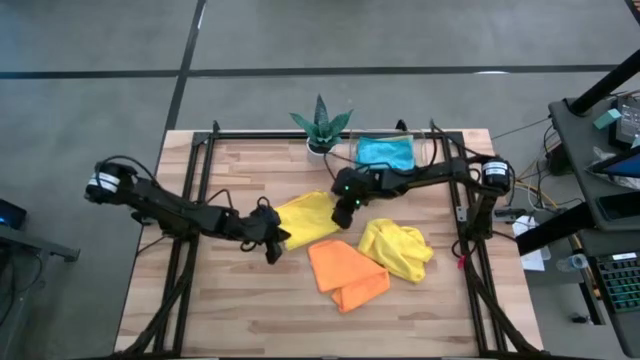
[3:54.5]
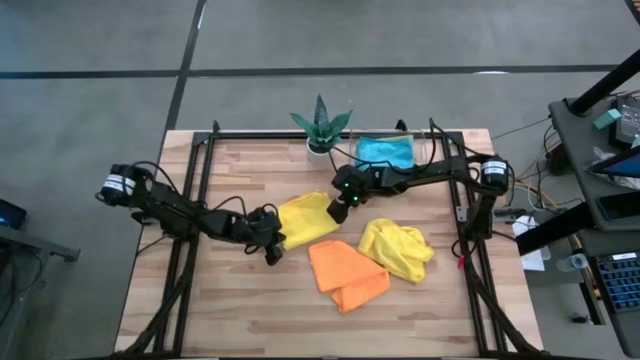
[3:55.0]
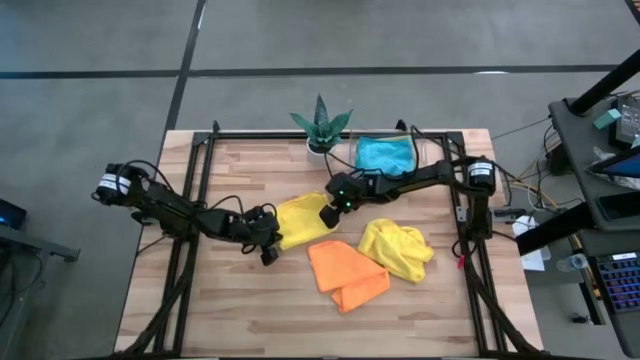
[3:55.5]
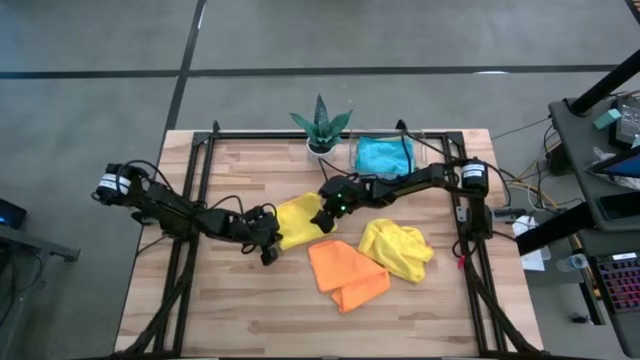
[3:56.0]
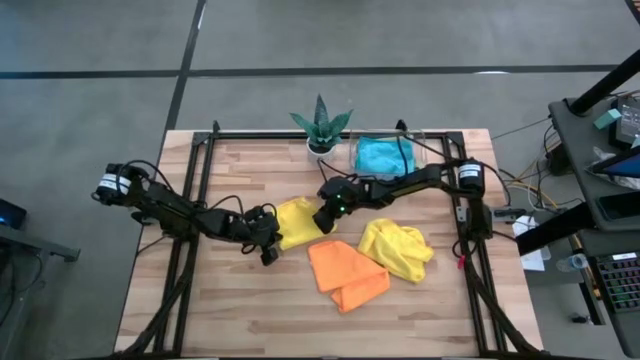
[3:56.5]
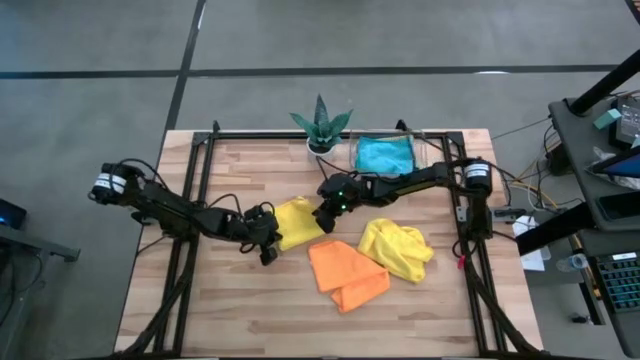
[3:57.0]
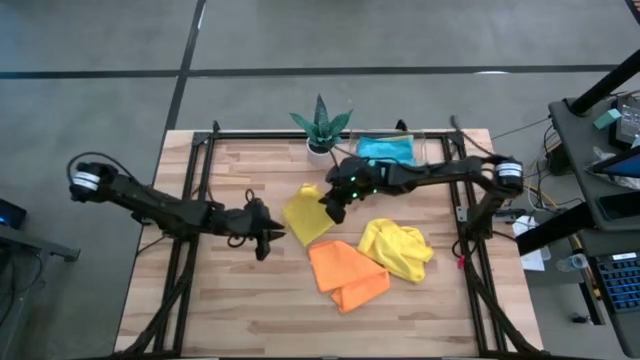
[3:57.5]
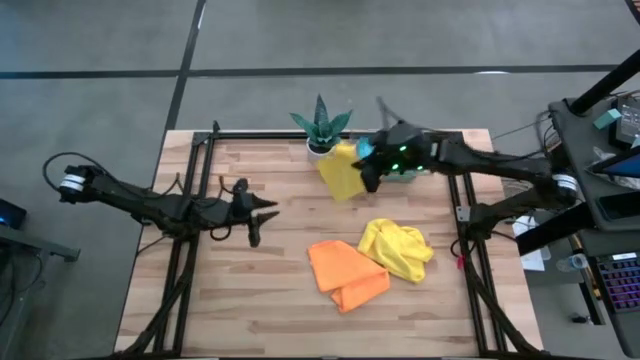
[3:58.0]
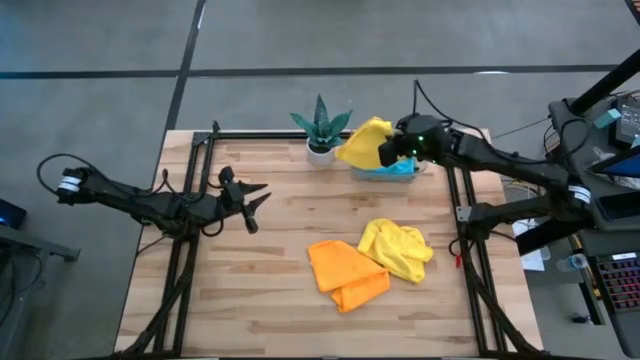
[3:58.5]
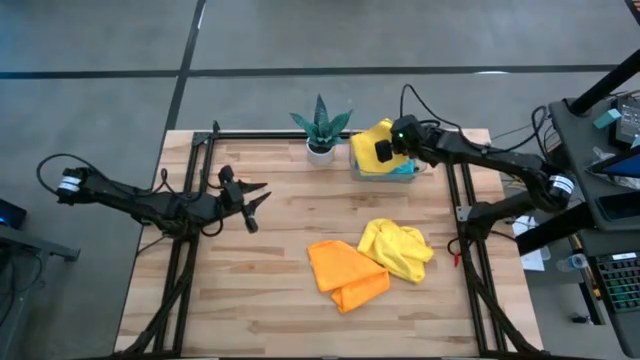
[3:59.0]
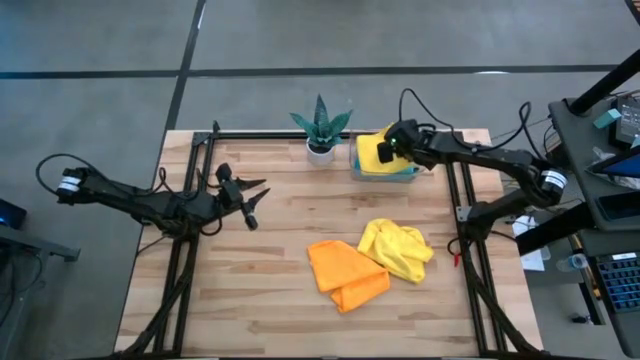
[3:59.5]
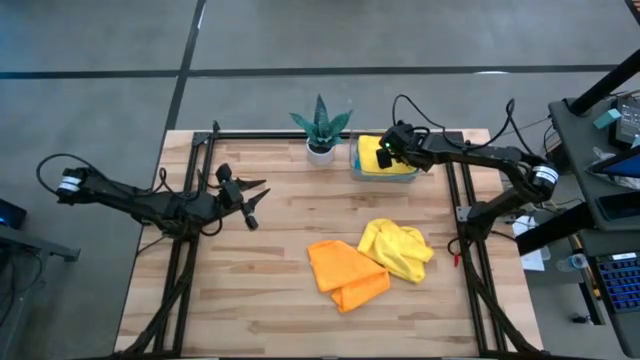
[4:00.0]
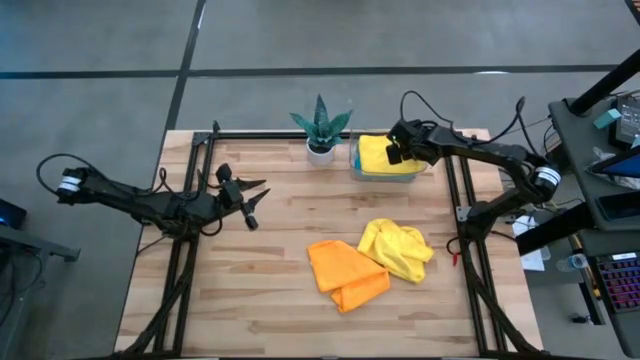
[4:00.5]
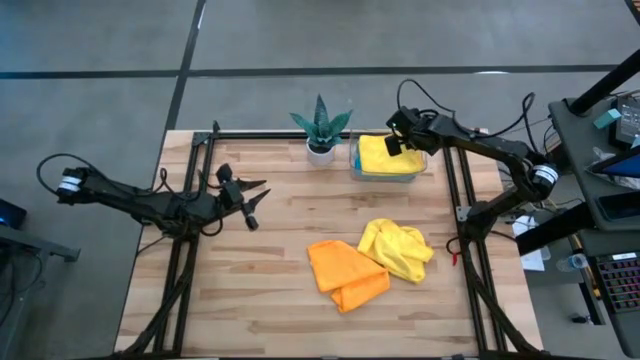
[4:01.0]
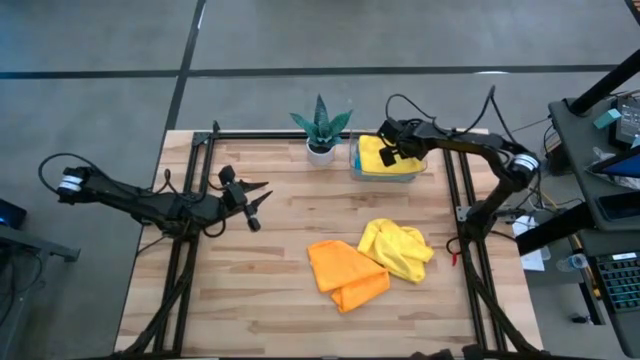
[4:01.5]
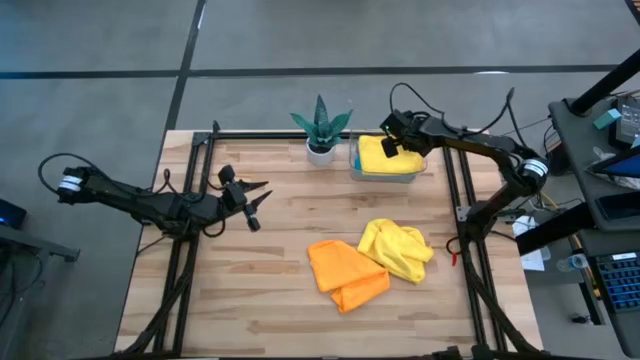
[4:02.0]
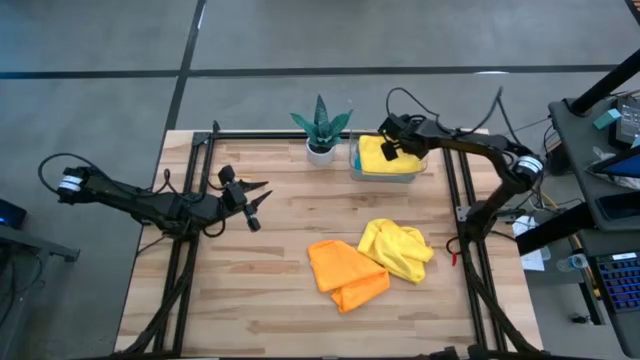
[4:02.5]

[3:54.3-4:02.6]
Task: Fold microfiber towels
Put the left yellow microfiber towel into the transparent bin

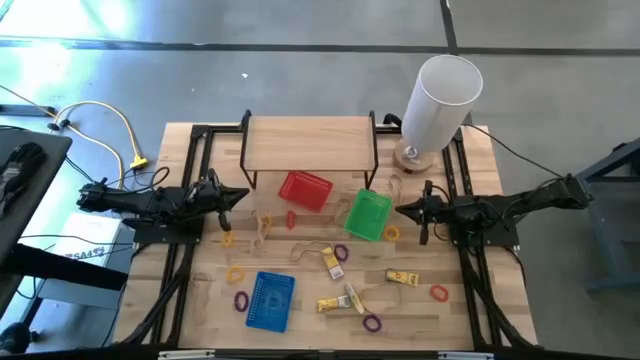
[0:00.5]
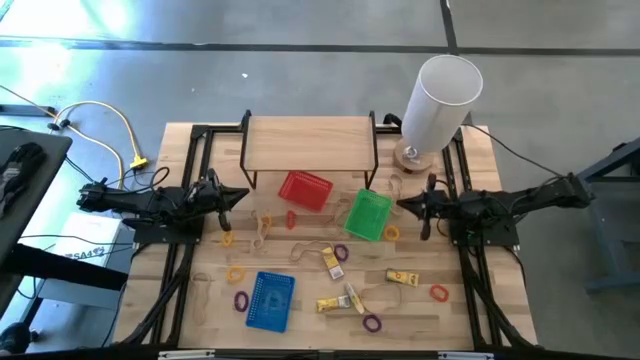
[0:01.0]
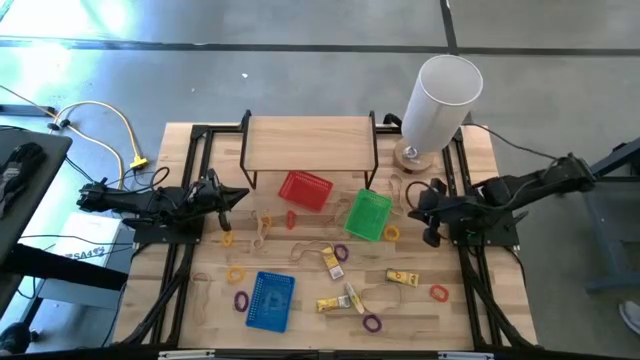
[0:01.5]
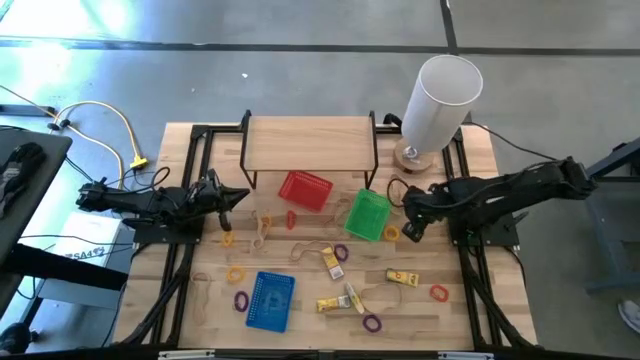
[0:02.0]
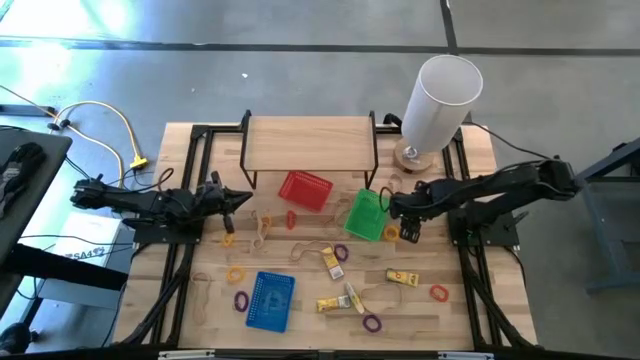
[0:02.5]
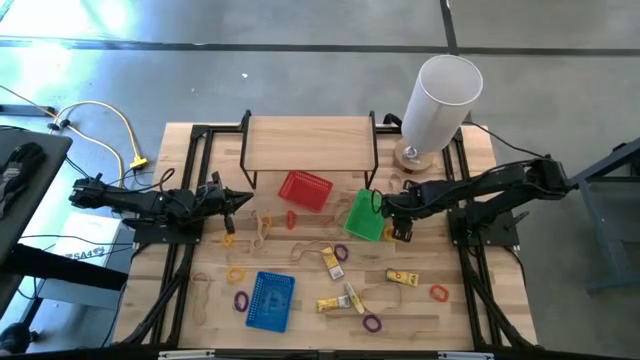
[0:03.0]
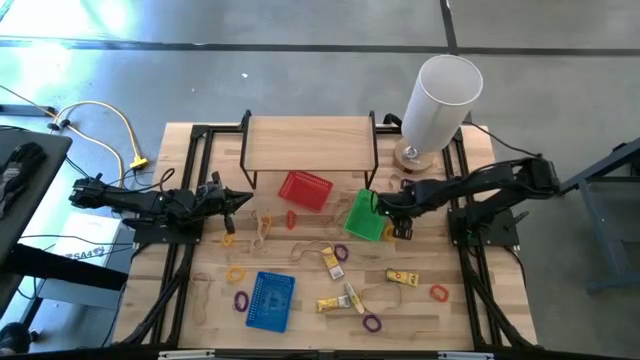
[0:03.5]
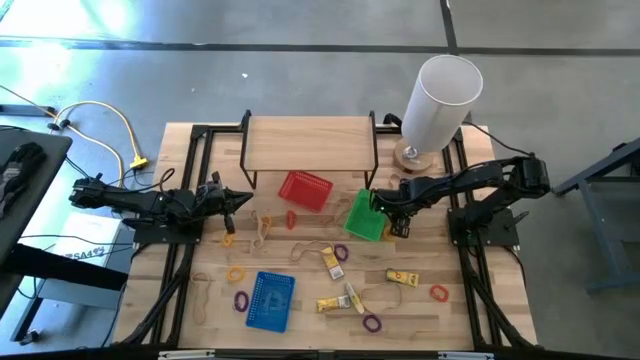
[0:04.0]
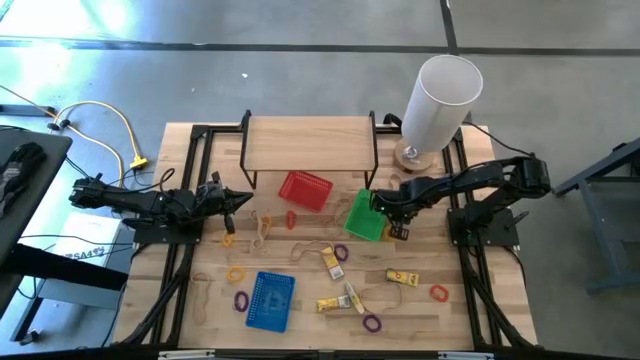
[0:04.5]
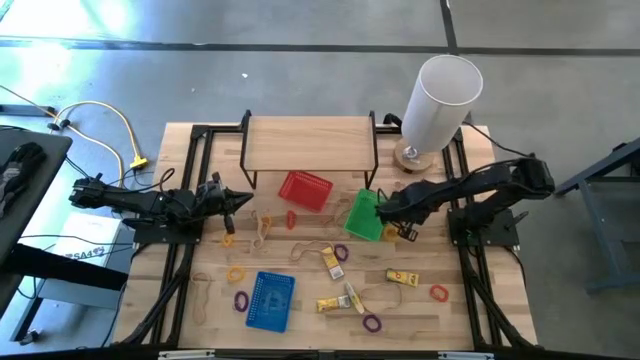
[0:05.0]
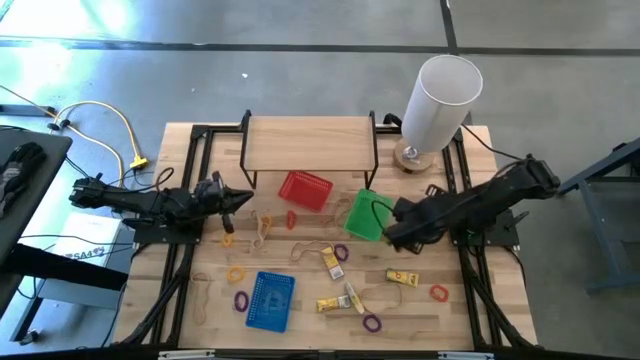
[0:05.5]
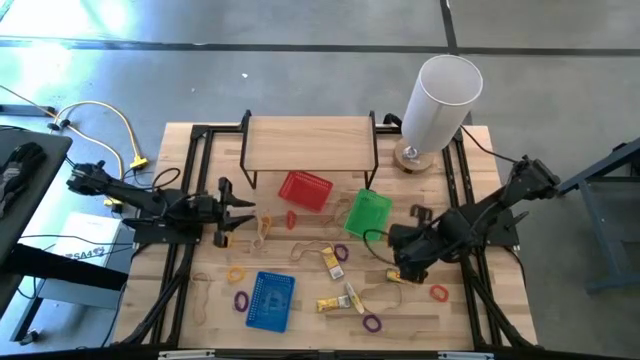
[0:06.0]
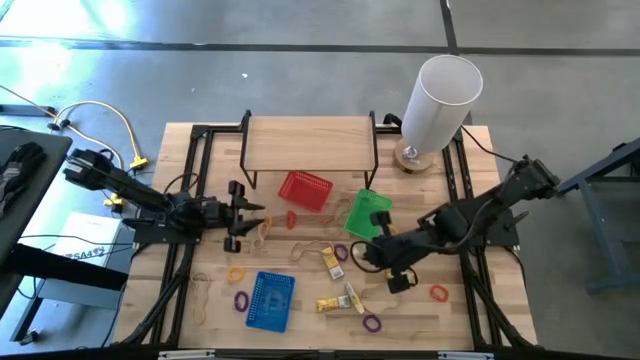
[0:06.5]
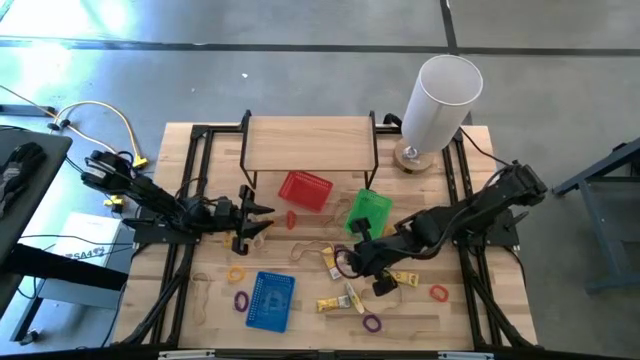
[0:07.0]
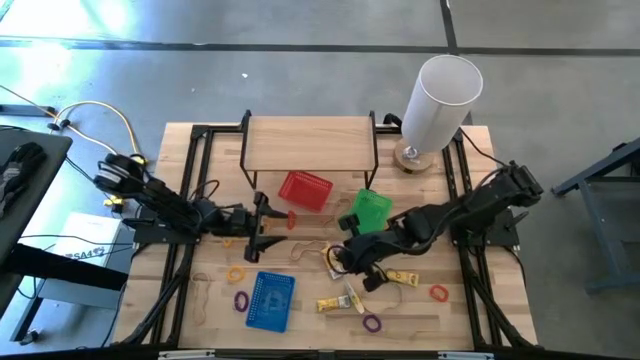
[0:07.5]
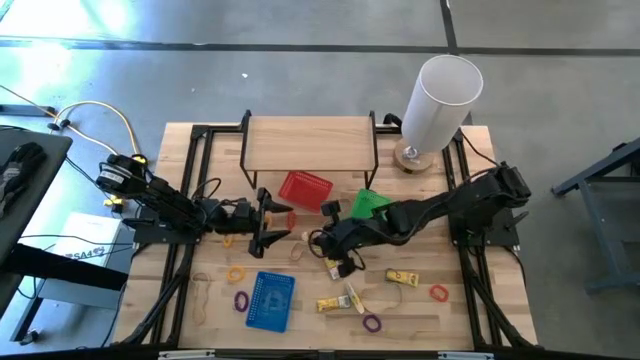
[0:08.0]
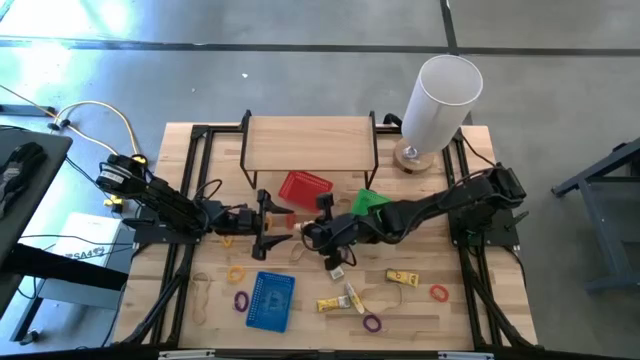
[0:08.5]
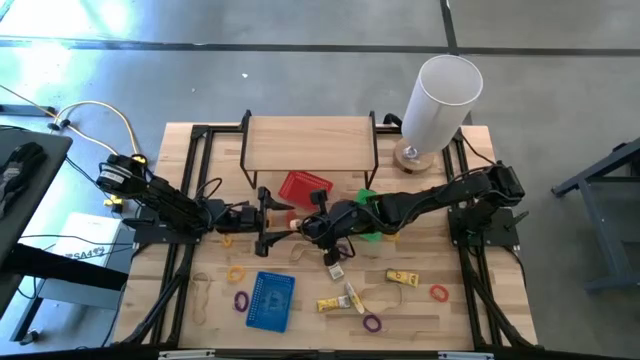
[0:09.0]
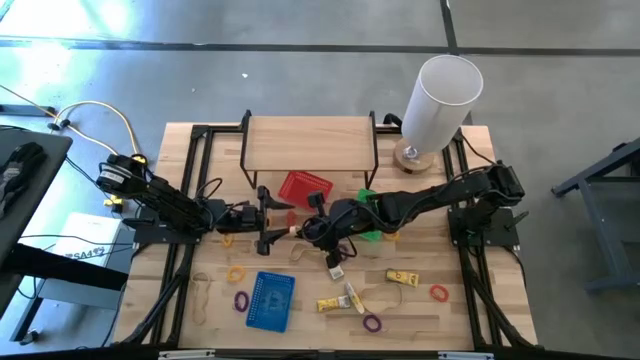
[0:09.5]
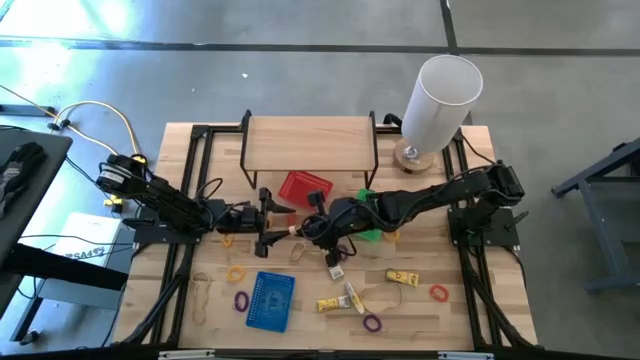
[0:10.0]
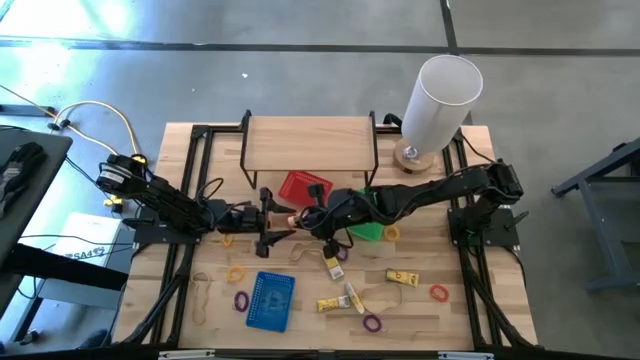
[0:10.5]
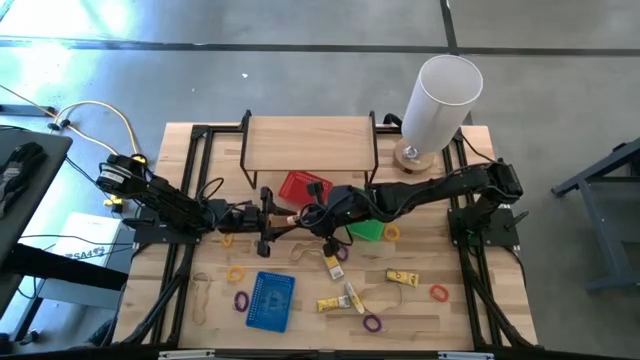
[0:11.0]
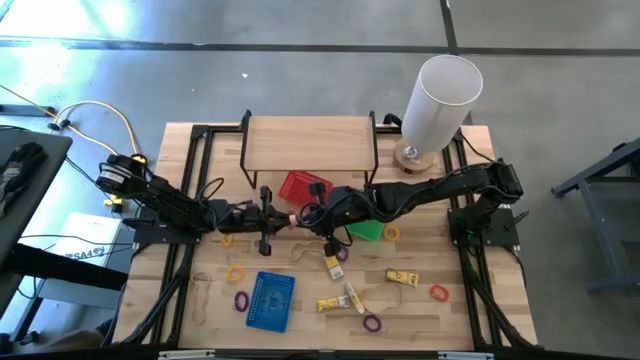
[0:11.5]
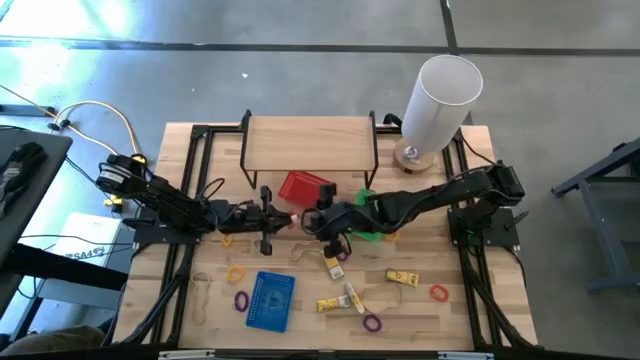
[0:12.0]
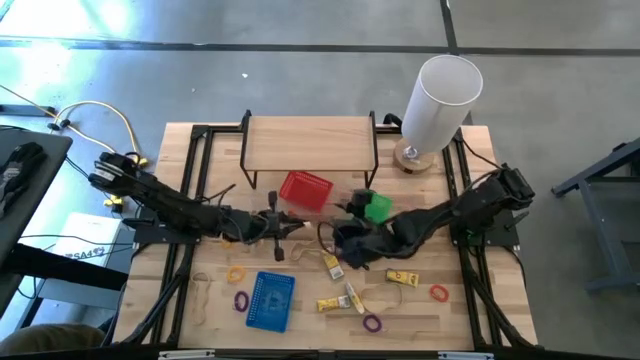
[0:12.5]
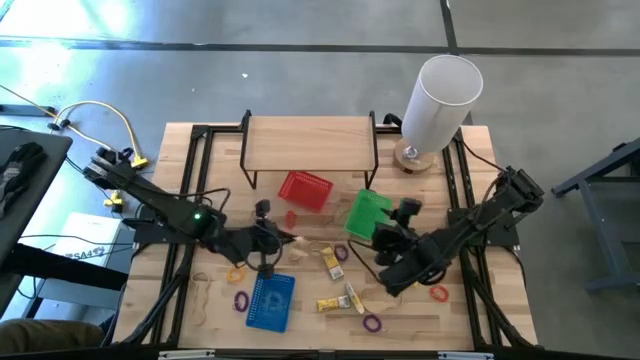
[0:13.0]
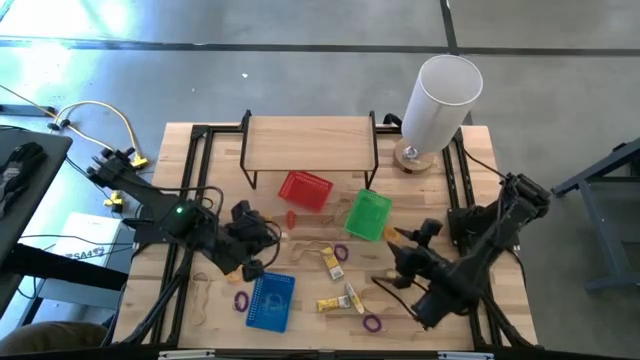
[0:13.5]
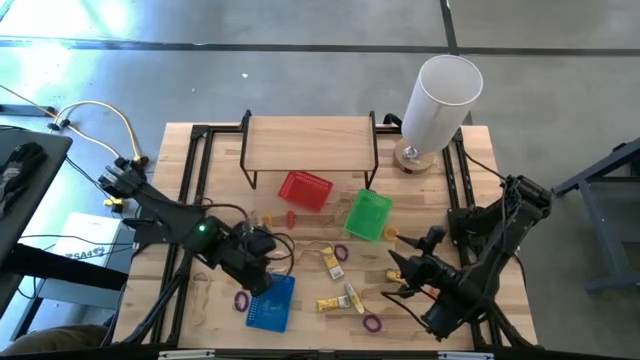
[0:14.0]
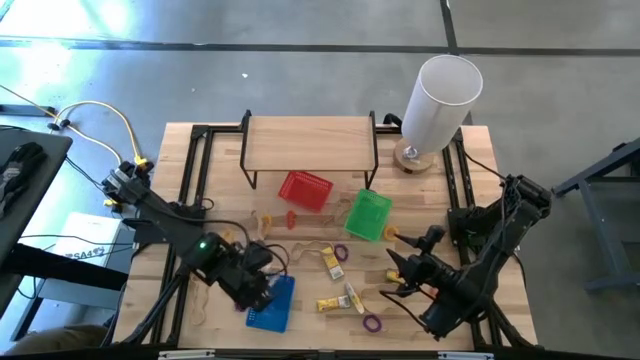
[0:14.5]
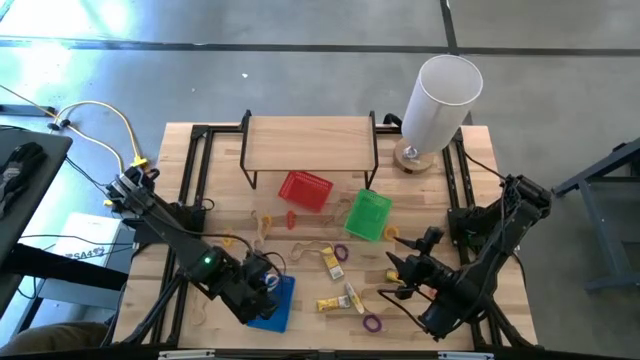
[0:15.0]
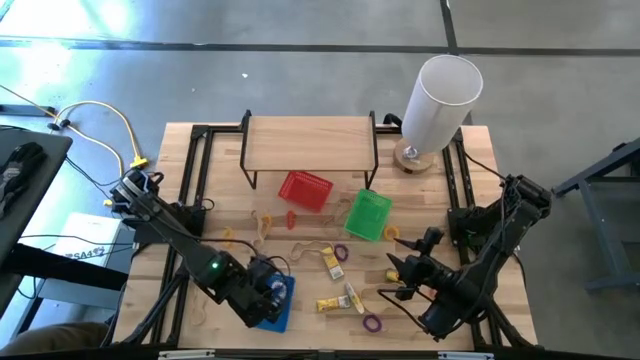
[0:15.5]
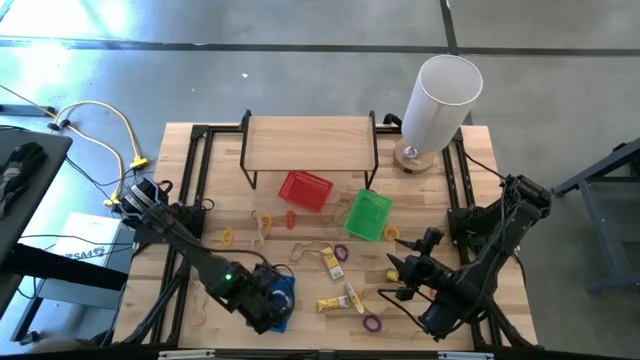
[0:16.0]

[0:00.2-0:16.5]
Task: Pick & Place Office Desk Supplies
Put the brown rubber band into the blue bin
